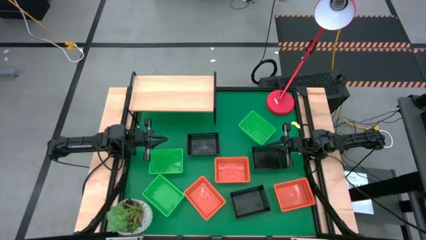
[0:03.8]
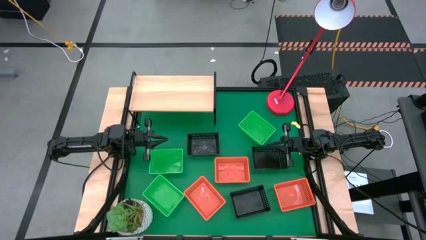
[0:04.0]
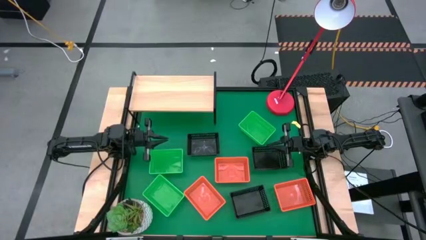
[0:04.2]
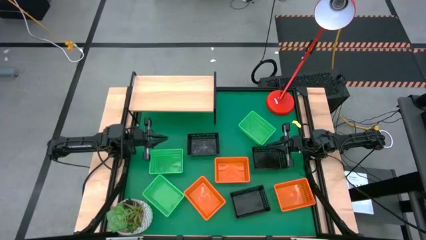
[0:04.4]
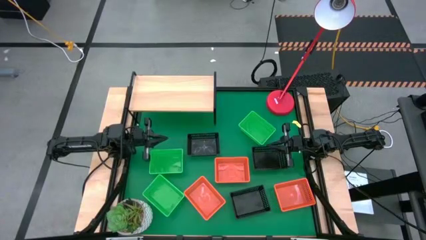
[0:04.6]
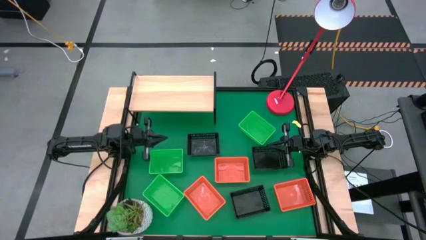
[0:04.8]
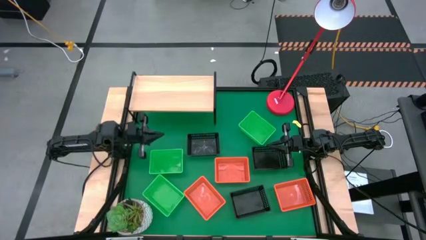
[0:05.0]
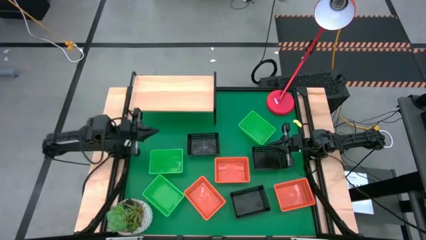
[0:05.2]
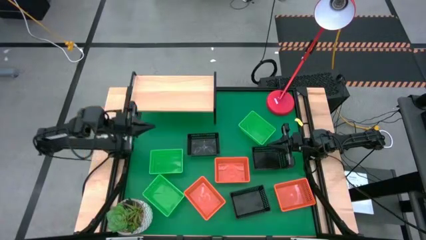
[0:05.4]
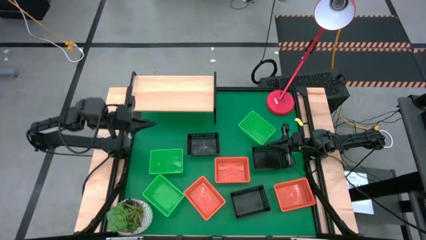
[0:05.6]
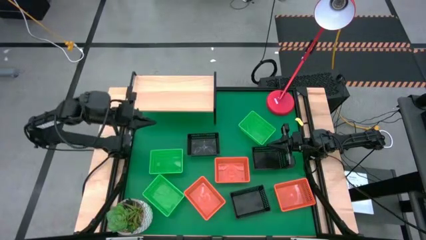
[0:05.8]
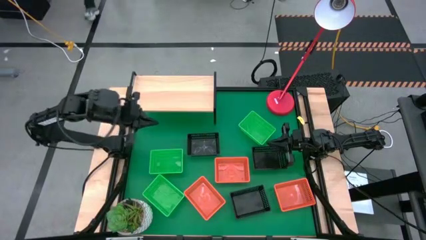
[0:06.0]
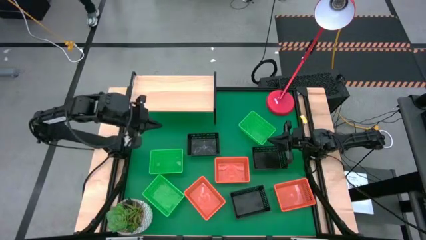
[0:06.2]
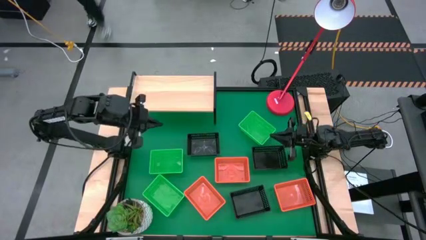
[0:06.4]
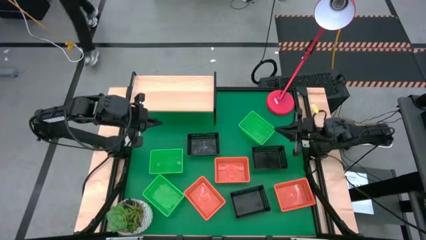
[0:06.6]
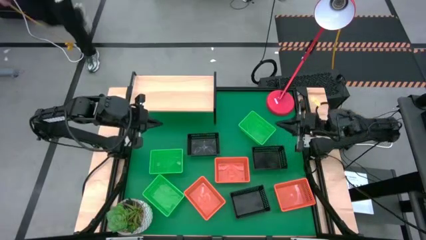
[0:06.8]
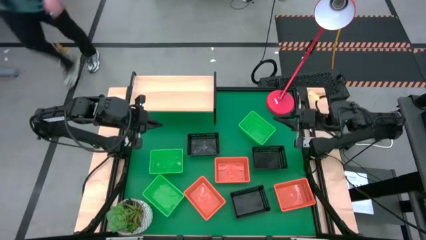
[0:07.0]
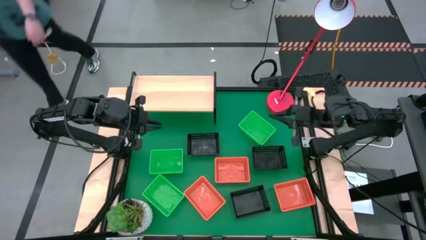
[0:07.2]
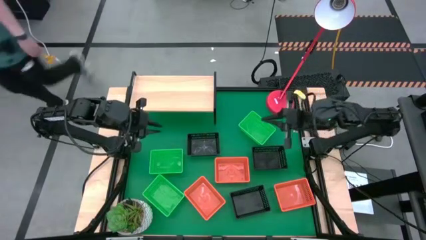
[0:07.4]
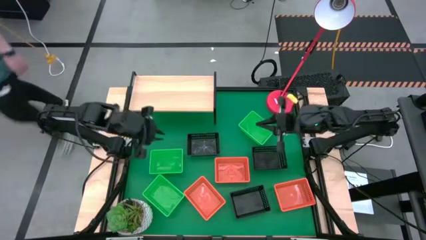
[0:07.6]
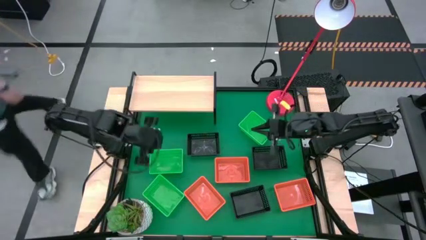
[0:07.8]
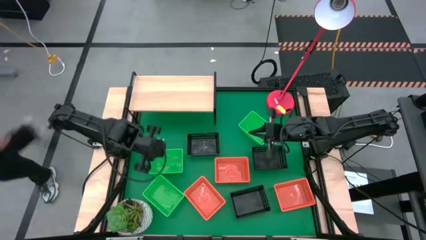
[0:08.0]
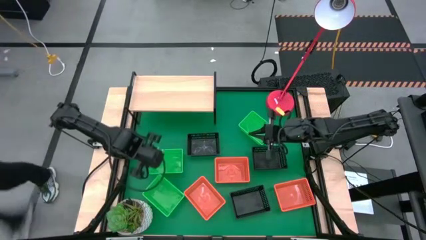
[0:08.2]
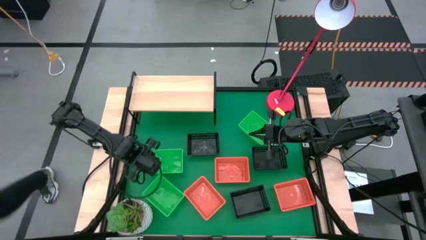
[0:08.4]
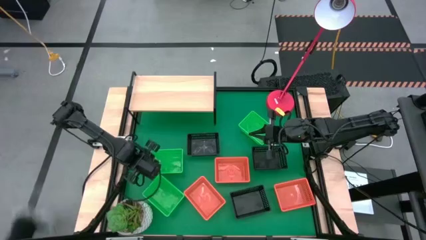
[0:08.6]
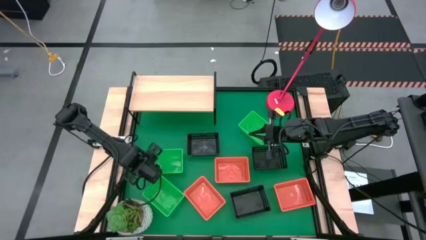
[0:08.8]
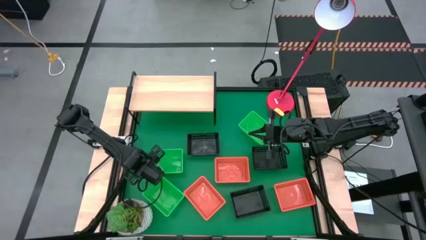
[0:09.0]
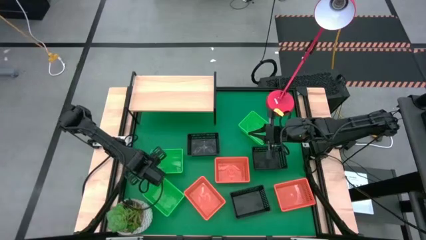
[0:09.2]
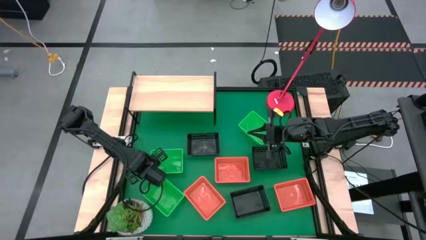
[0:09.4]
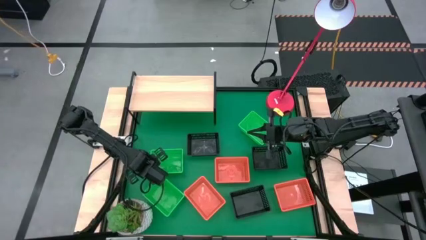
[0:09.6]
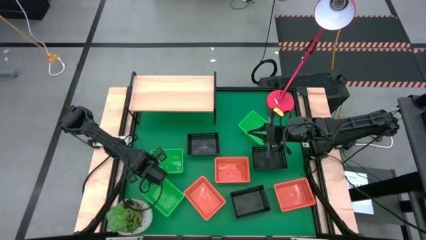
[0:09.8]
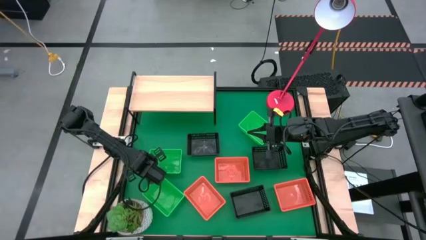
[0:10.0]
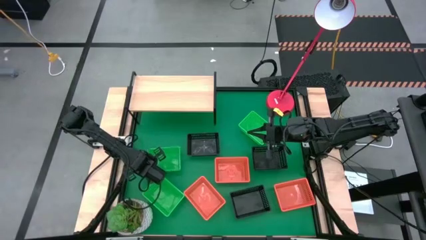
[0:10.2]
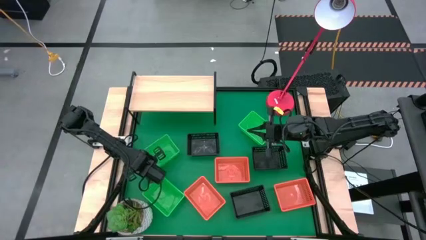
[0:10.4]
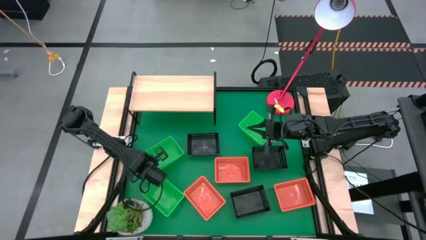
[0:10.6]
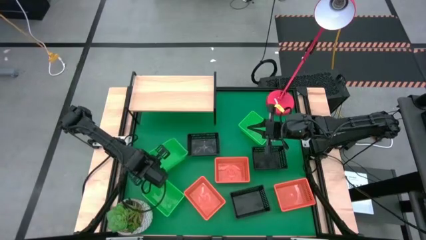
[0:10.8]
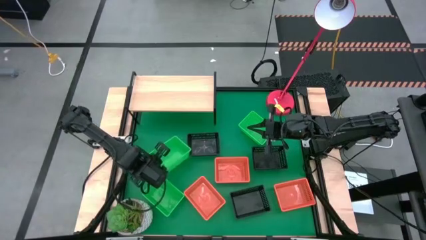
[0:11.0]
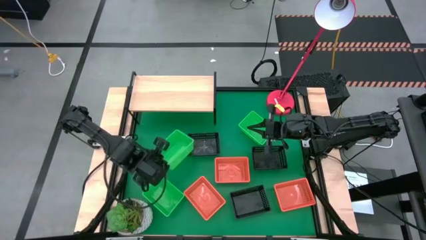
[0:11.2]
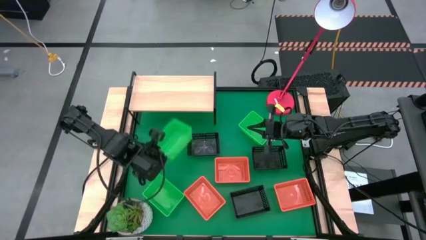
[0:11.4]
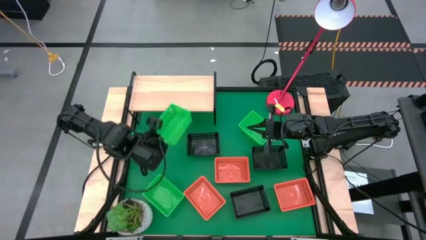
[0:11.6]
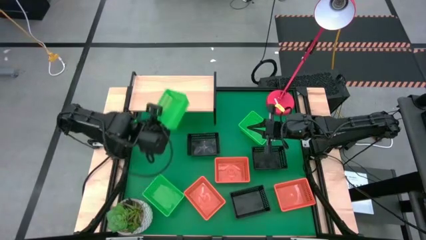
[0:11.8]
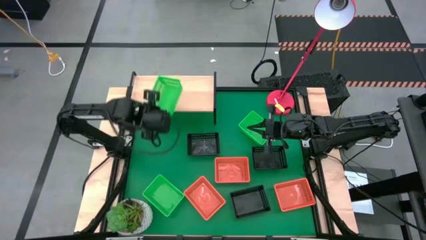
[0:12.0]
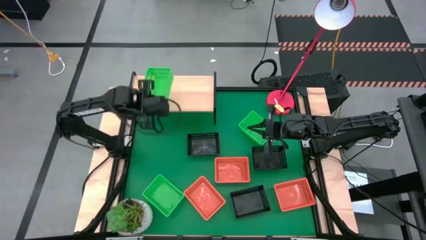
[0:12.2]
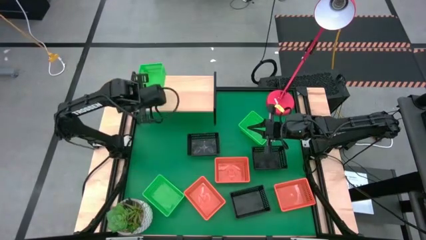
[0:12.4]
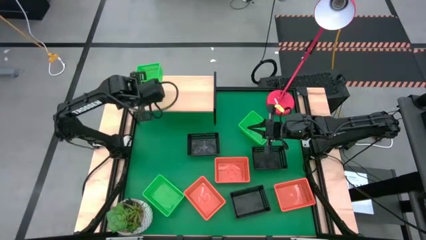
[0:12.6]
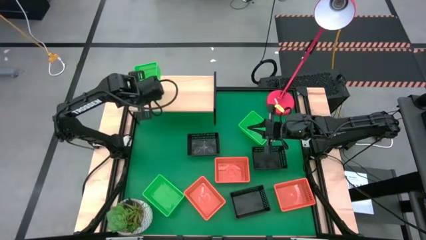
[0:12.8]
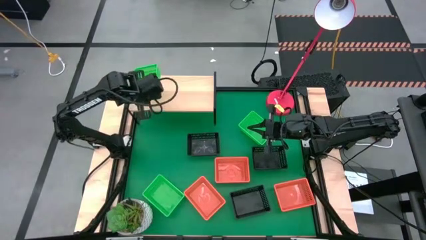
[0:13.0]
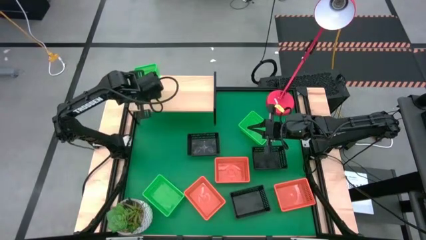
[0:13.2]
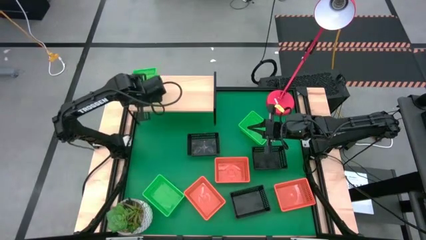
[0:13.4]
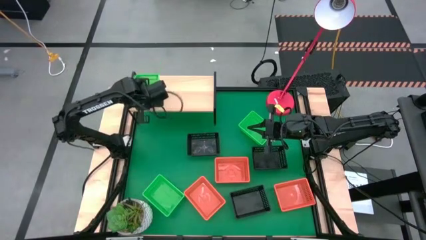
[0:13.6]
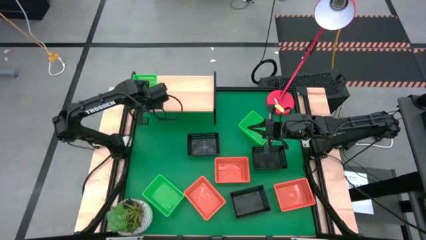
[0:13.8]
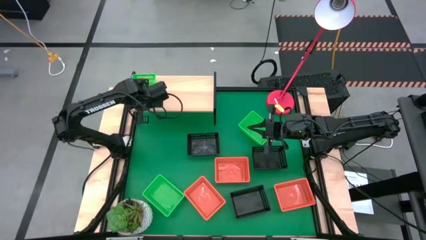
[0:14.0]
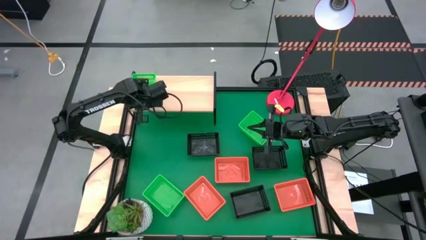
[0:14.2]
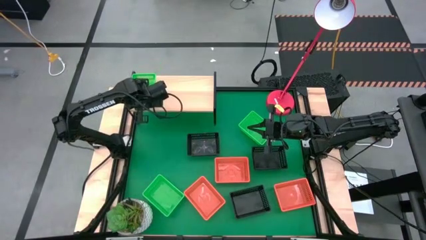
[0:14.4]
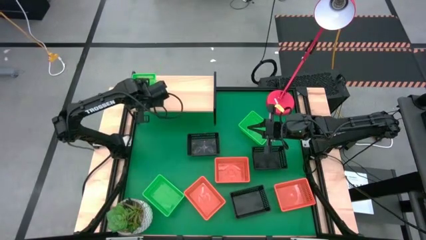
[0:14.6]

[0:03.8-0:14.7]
Task: Stack baskets on shelf by color
Put the top left green basket on the shelf

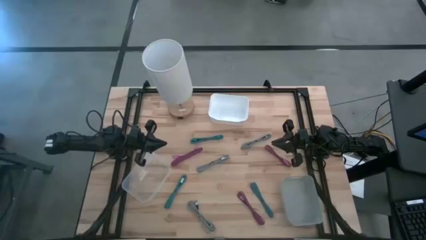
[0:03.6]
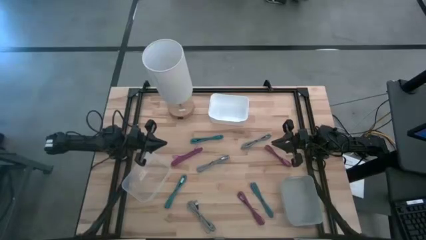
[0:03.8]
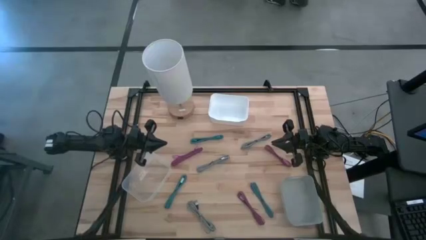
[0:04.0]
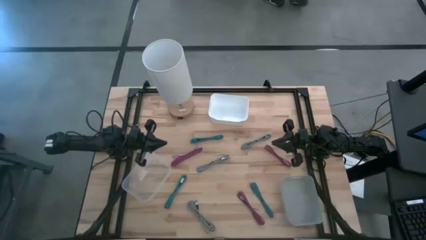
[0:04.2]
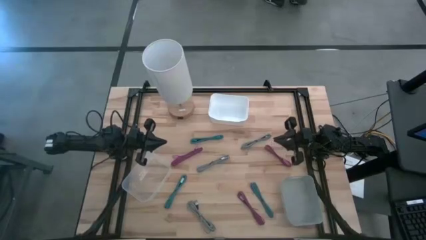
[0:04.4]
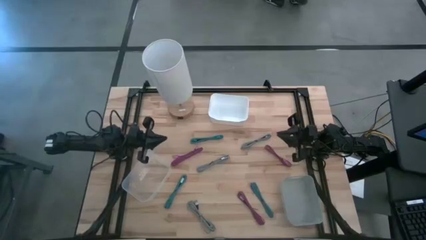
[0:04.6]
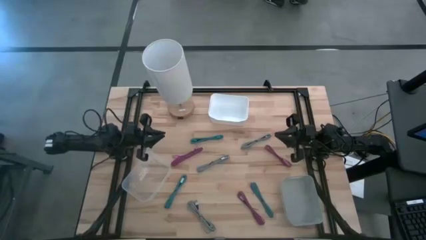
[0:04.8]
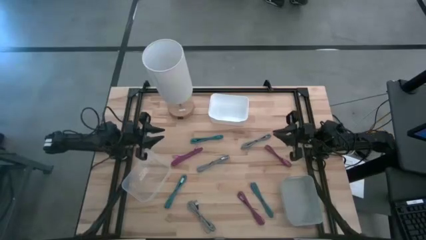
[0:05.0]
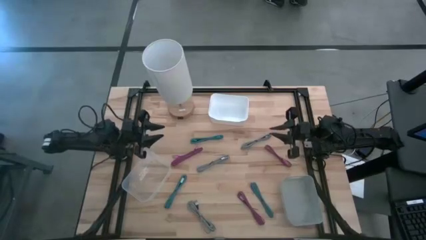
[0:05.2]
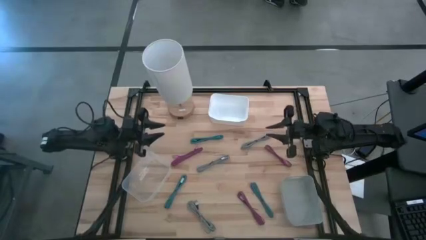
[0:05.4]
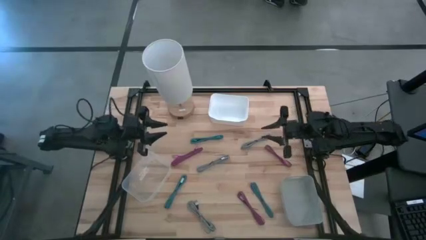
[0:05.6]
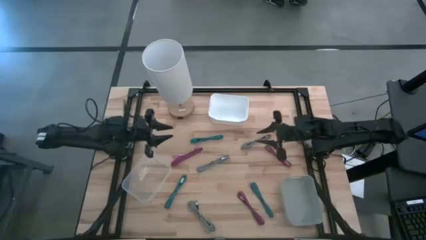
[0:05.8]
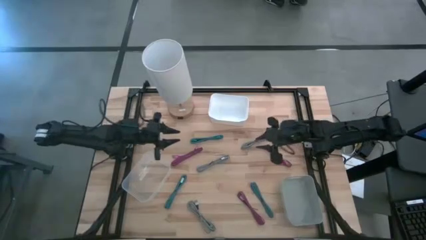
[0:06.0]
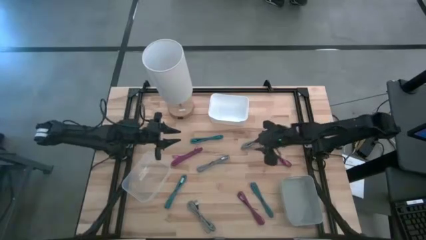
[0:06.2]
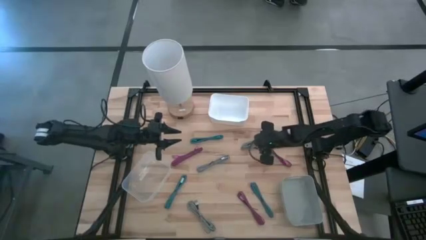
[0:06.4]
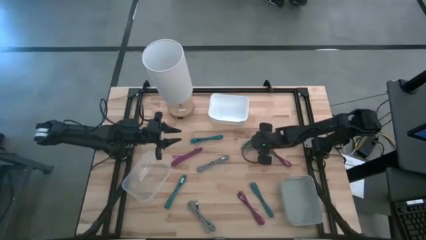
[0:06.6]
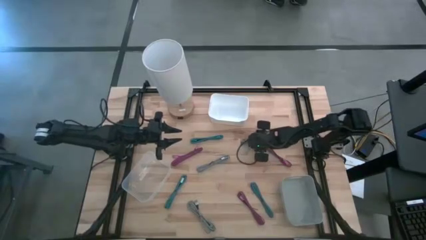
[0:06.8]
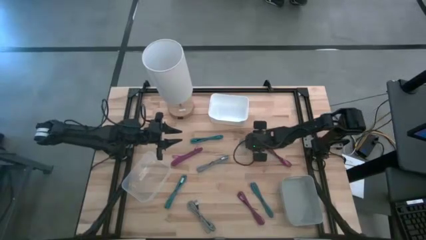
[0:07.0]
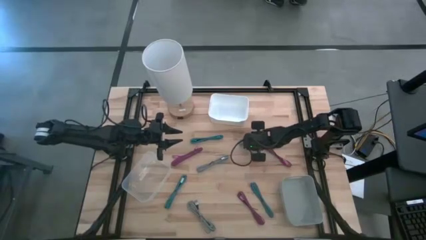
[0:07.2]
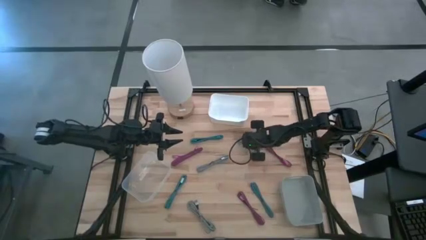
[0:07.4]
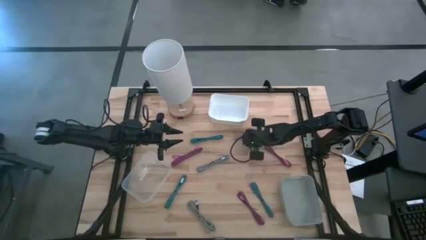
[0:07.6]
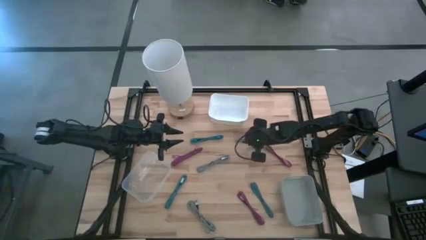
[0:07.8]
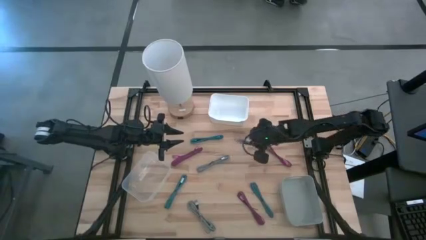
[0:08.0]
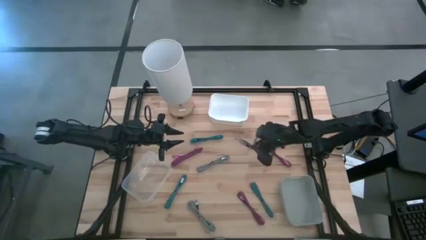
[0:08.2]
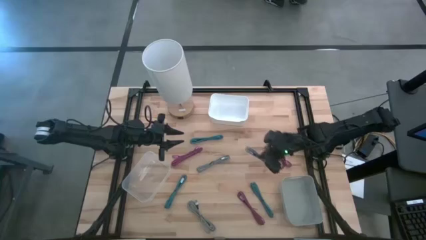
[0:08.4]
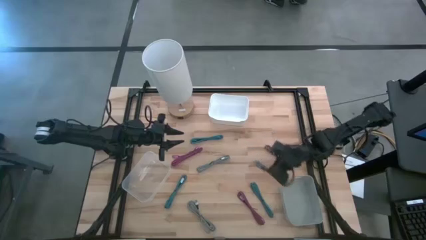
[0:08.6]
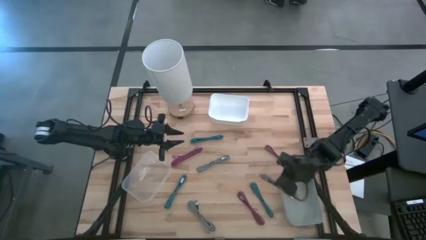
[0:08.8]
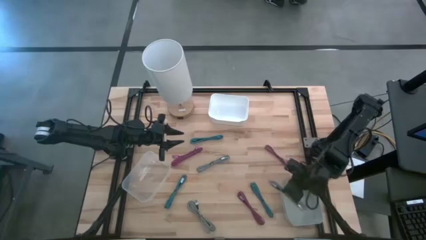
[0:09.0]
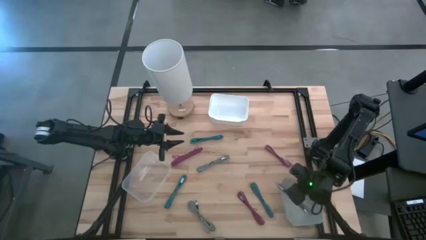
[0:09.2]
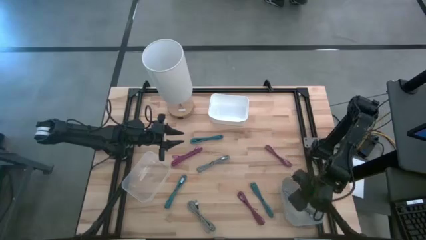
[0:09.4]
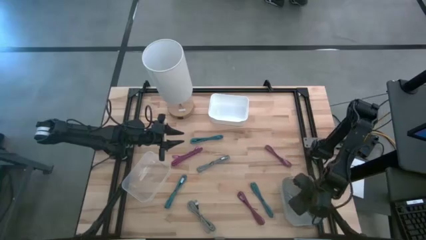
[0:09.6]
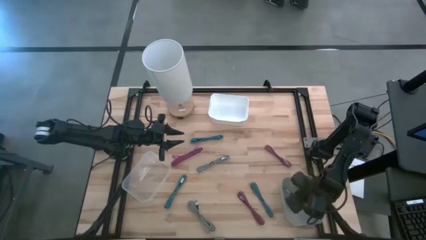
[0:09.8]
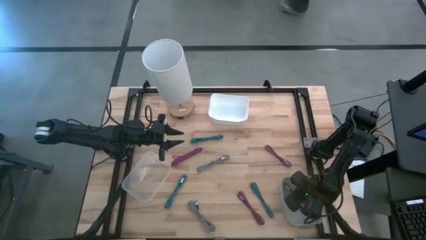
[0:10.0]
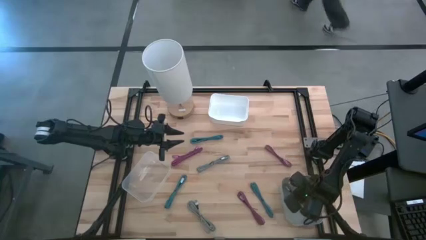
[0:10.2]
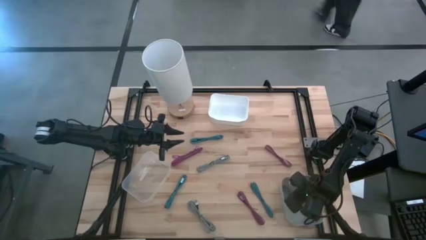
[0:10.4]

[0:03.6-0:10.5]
Task: Pick & Place USB Port
Put the top right white charger cable into the gray bin
